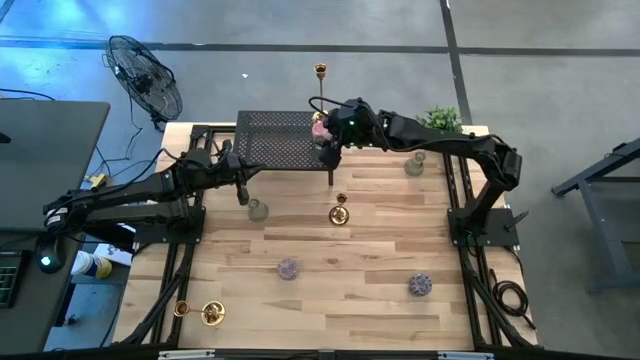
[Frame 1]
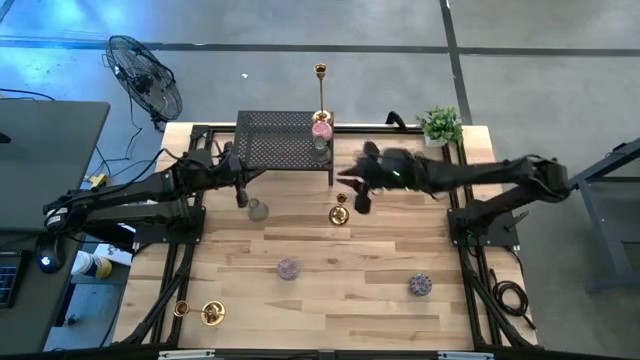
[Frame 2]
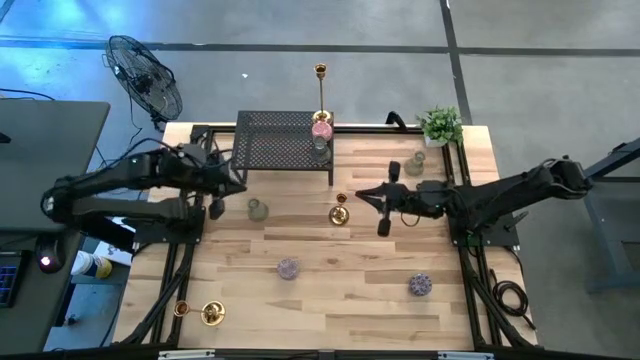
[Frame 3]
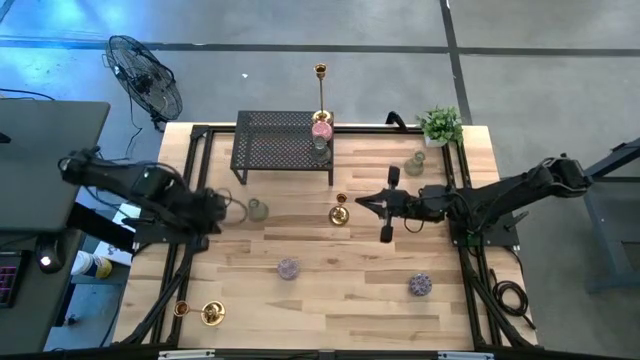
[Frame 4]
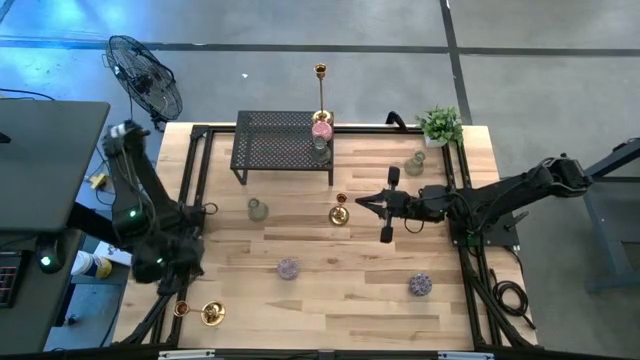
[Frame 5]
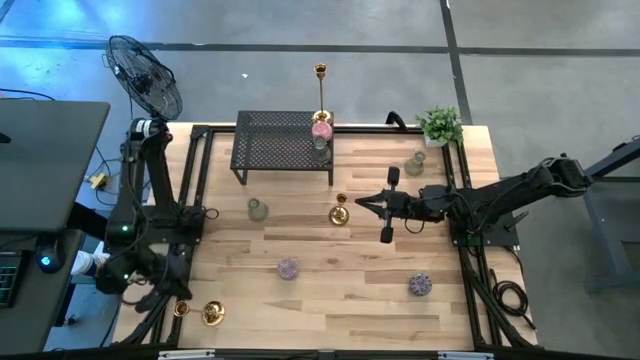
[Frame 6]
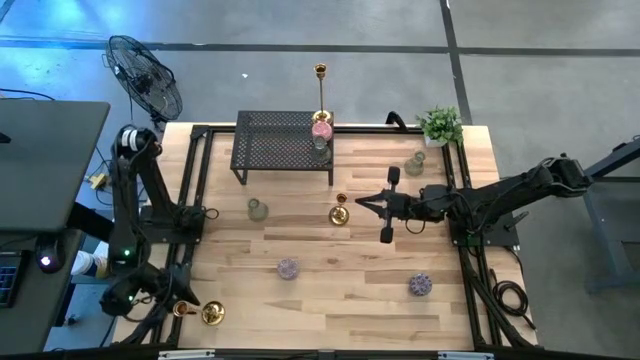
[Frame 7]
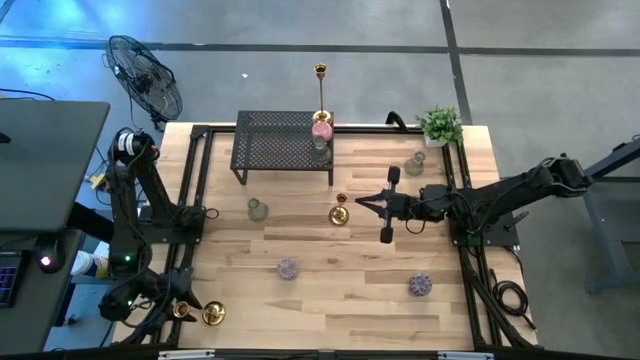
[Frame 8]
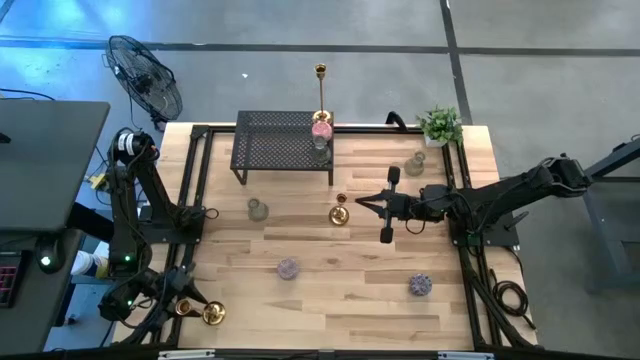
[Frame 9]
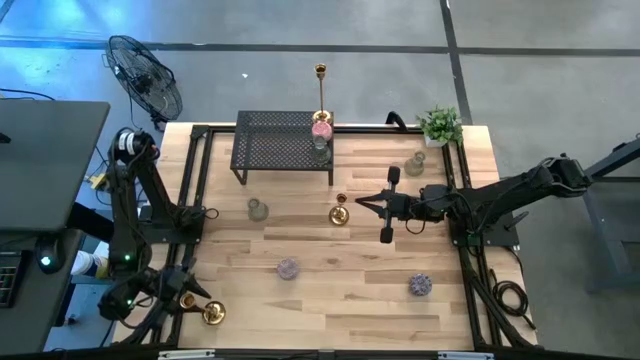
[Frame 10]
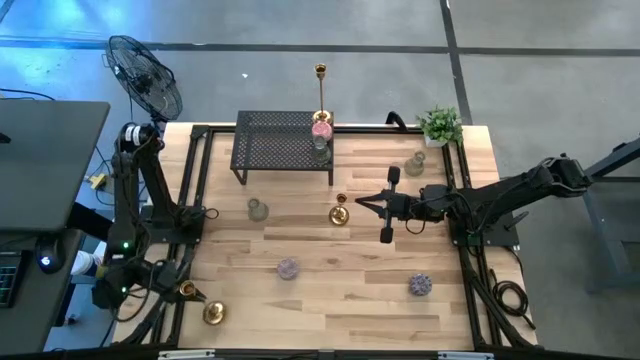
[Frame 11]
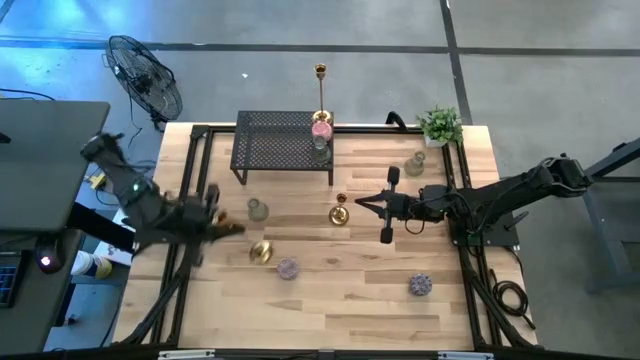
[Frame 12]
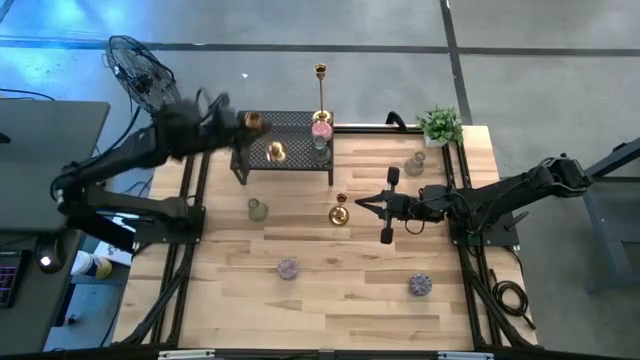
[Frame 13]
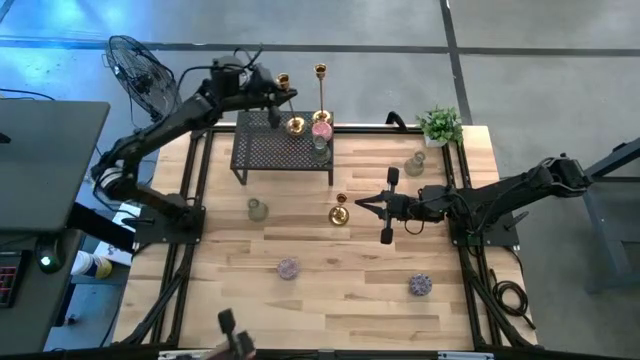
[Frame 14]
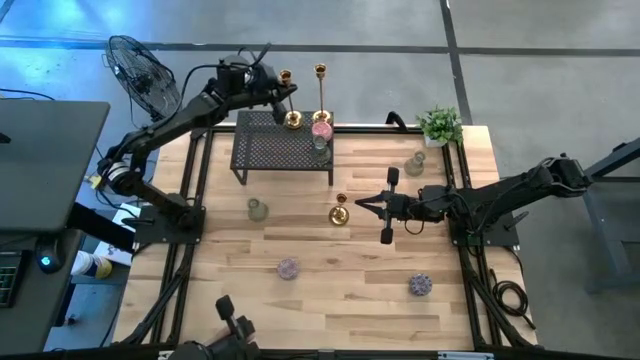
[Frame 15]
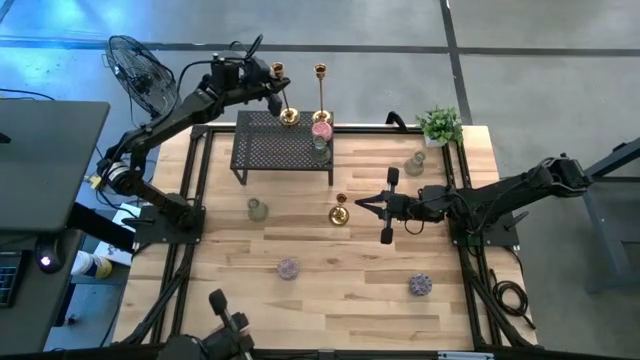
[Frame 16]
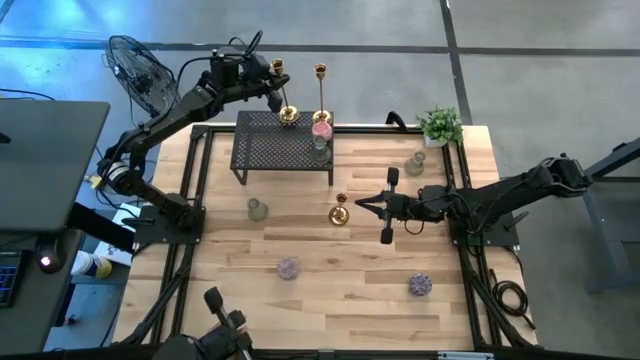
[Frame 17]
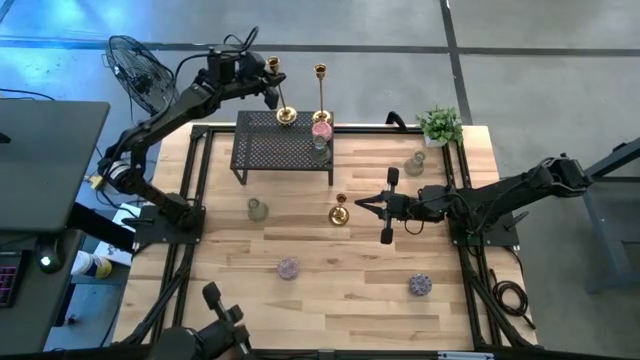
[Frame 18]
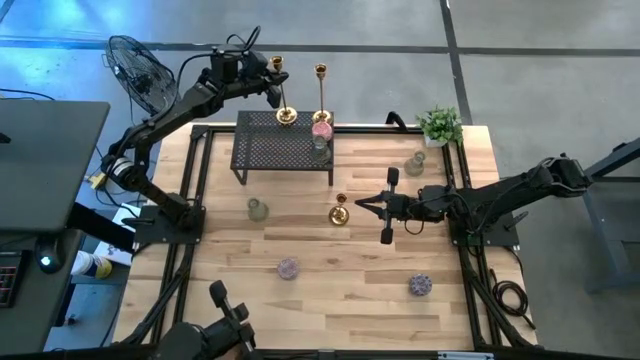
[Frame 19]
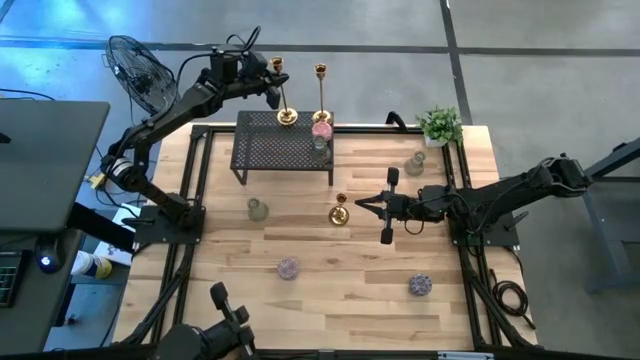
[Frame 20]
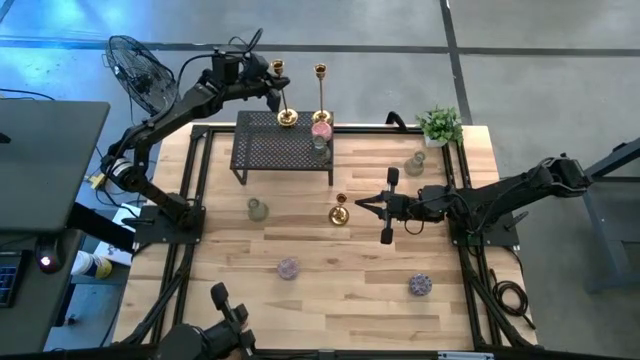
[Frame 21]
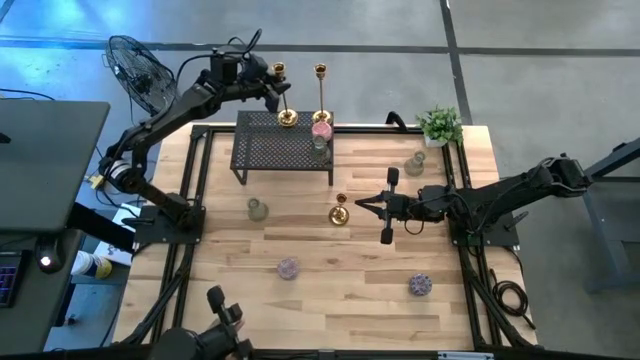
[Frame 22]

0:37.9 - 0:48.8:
Task: Pick & Place candle stick holders
Put the bottom gold candle holder on the shelf

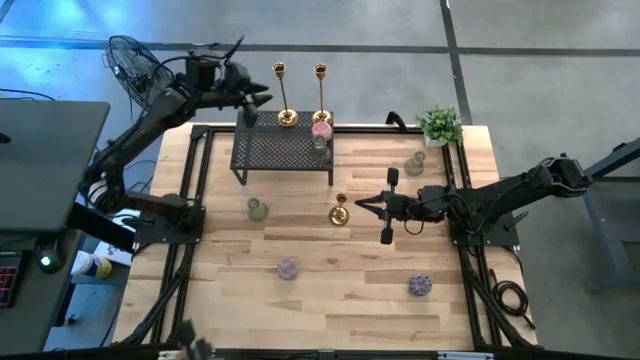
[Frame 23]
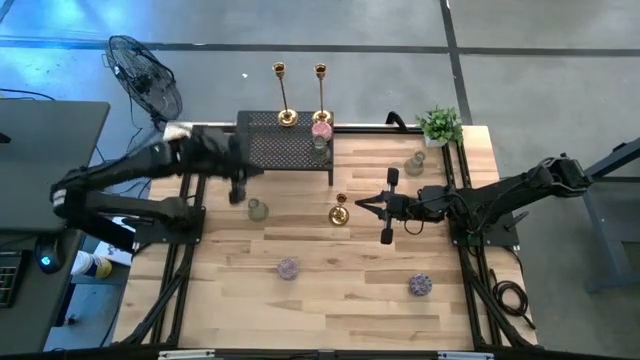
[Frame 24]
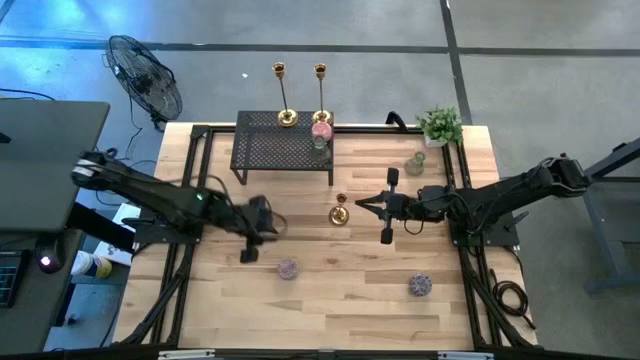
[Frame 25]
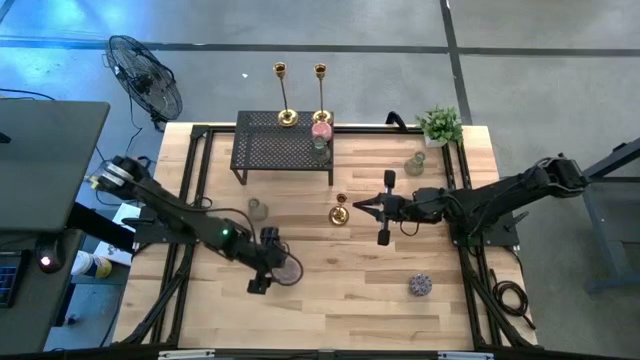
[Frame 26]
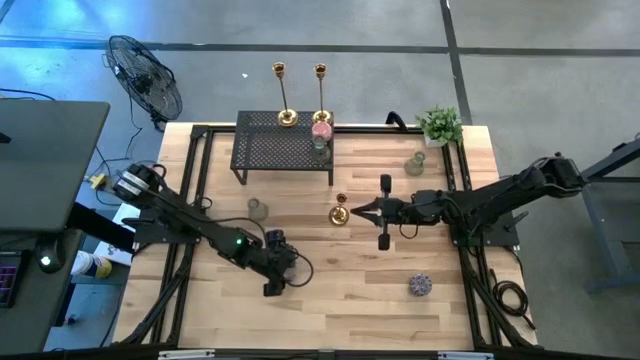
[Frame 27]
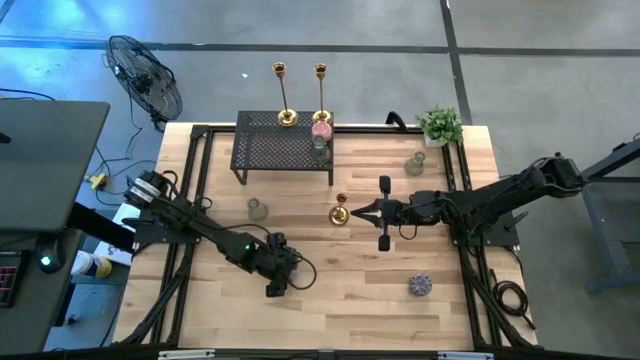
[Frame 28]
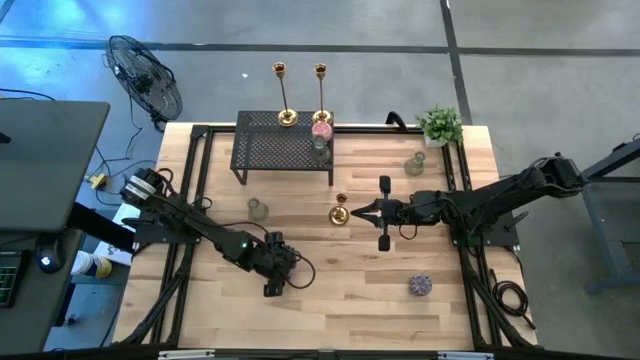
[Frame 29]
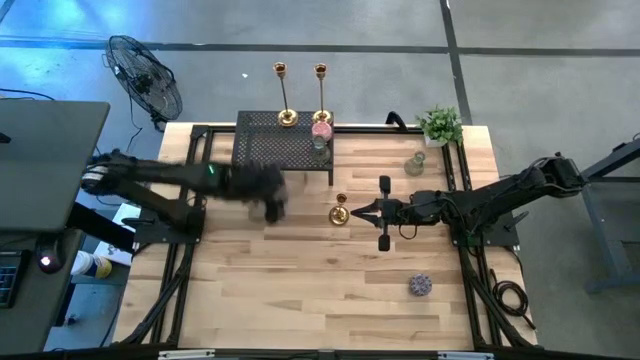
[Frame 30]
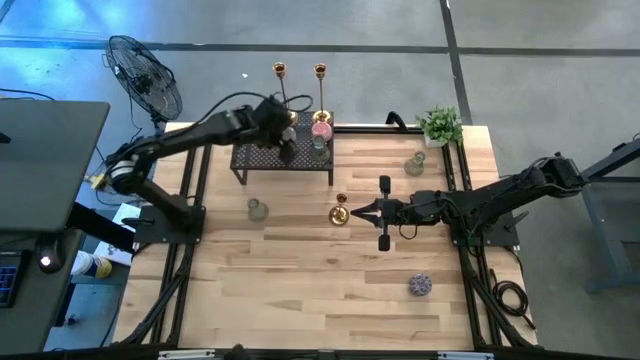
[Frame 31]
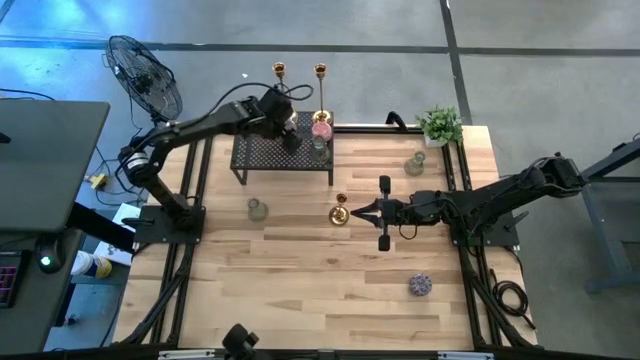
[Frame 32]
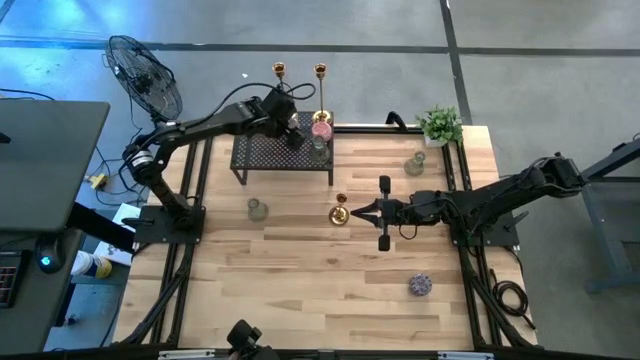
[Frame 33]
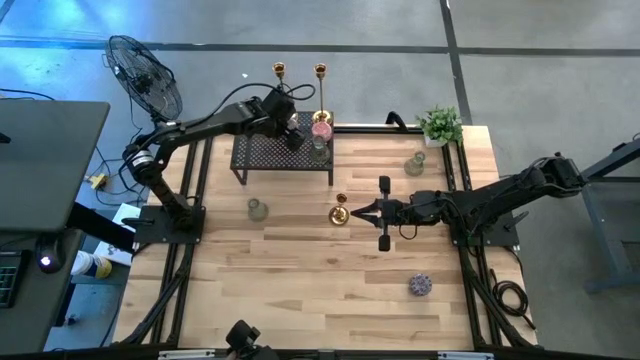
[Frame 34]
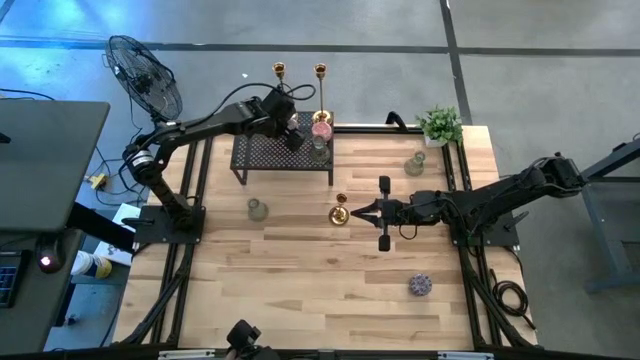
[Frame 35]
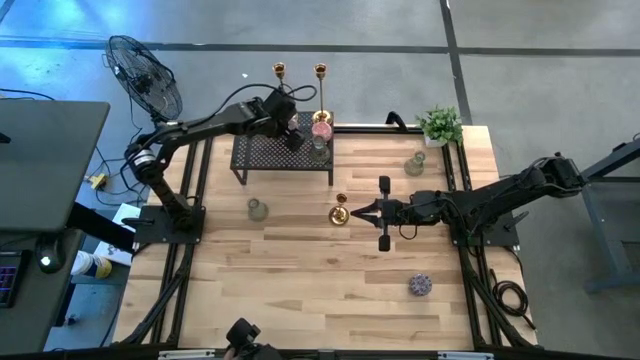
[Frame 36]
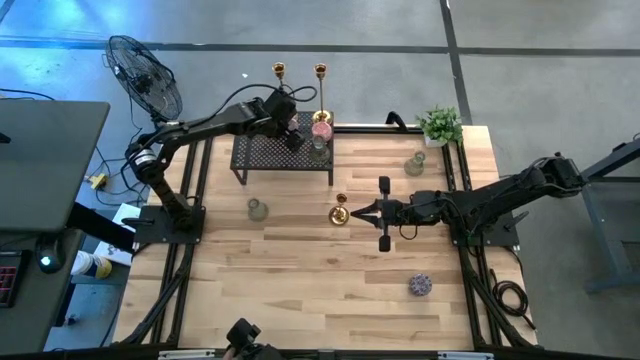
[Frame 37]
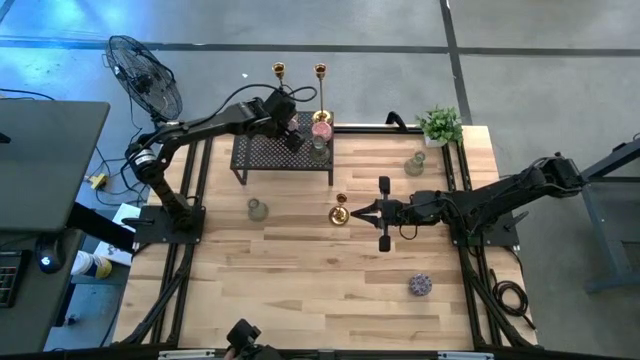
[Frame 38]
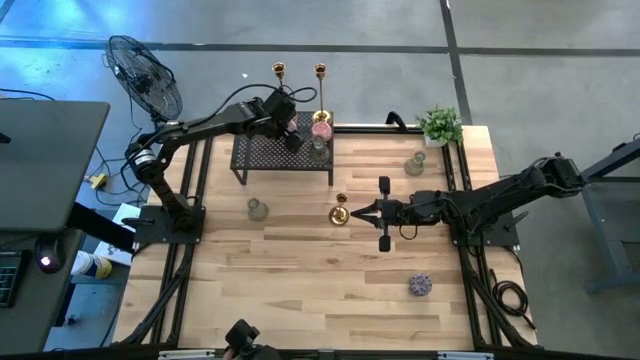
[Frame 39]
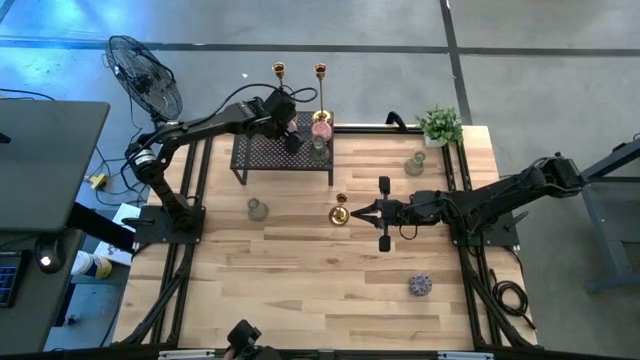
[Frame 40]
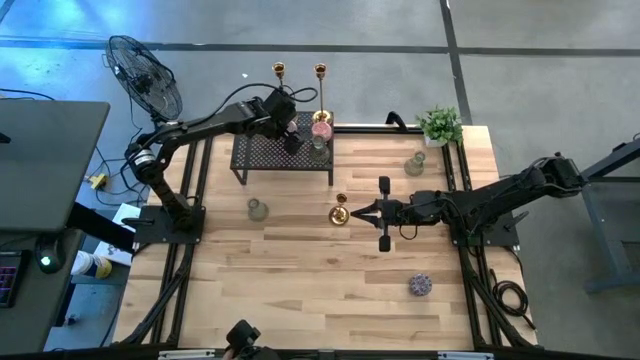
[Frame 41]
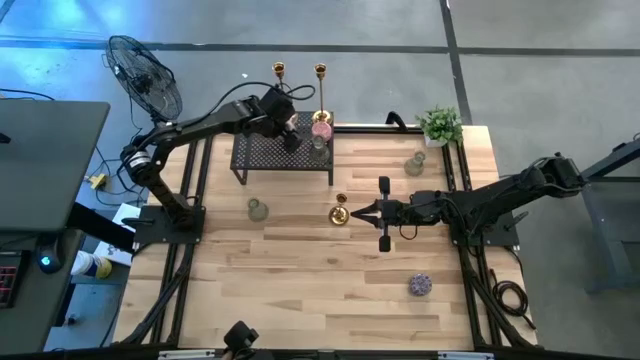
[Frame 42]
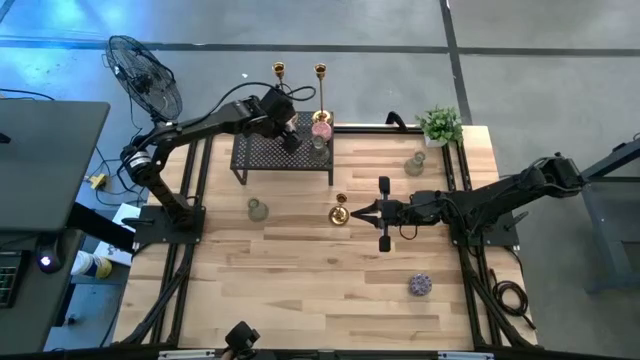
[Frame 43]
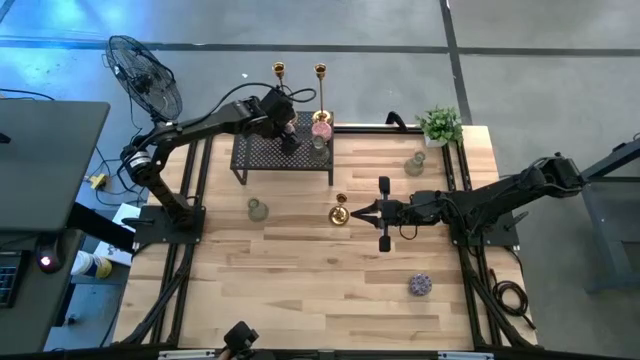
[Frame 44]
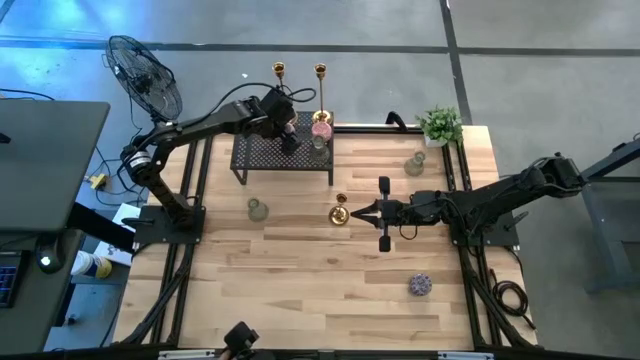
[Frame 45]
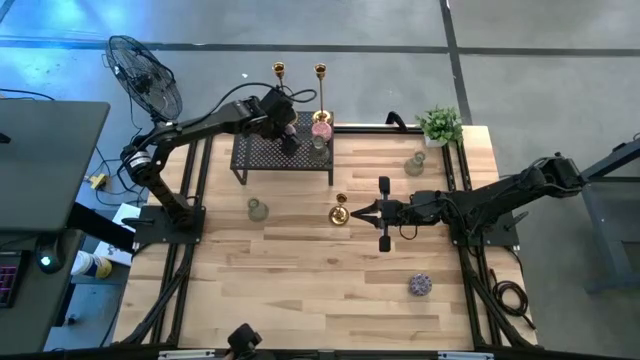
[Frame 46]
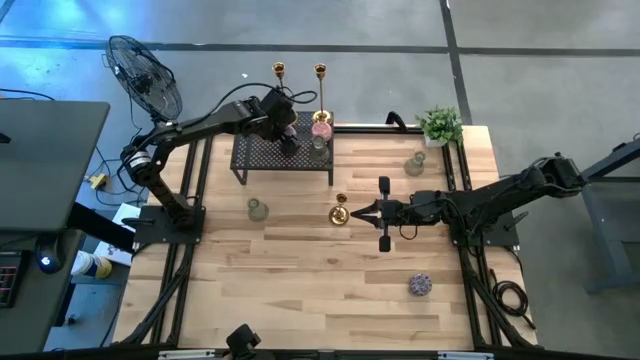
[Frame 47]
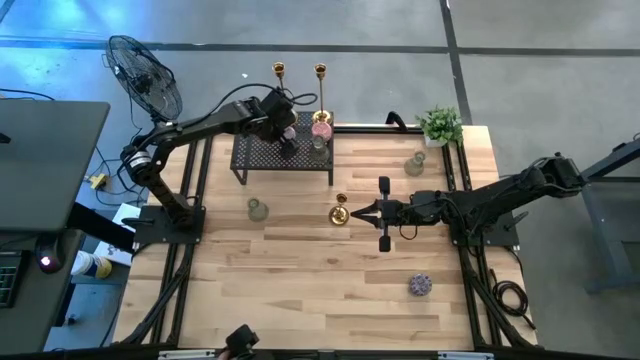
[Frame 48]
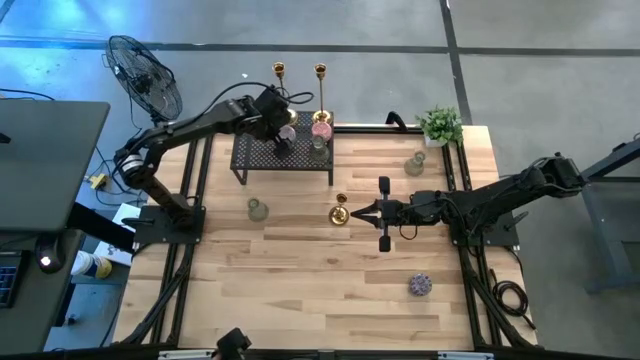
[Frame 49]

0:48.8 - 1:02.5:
Put the left red patterned scented candle on the shelf
